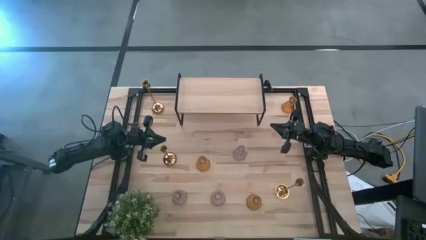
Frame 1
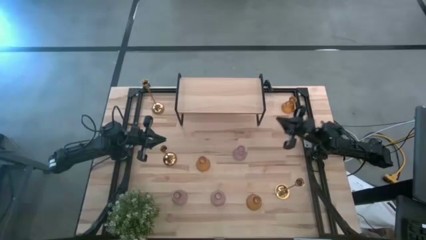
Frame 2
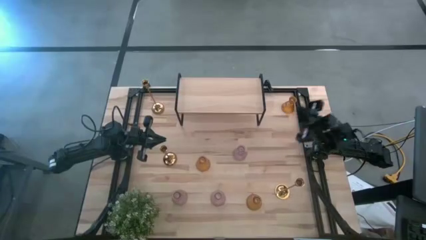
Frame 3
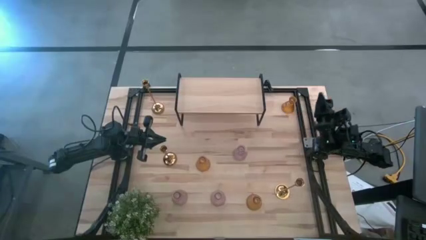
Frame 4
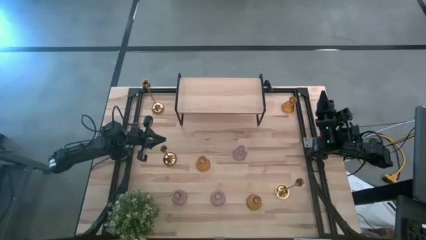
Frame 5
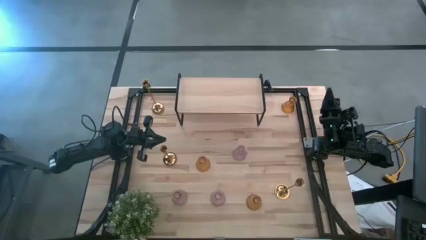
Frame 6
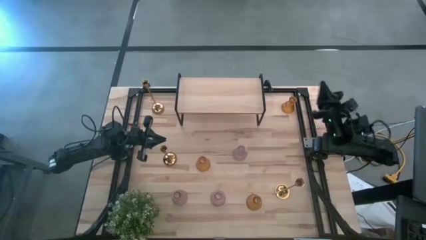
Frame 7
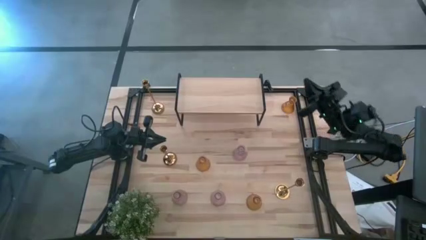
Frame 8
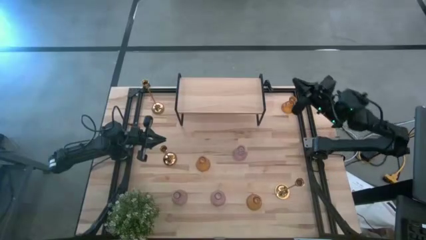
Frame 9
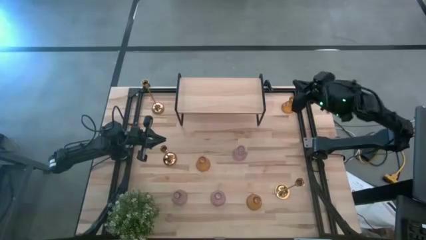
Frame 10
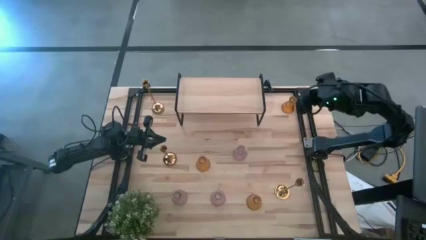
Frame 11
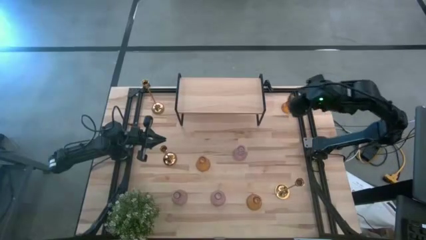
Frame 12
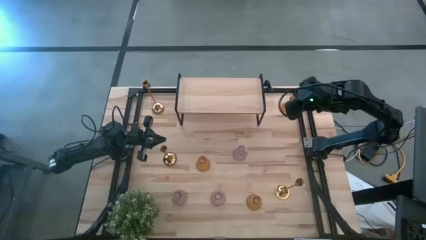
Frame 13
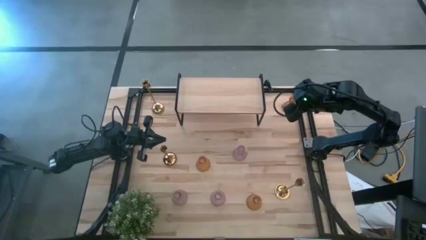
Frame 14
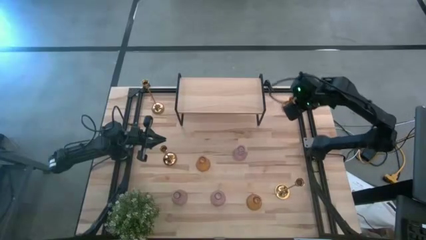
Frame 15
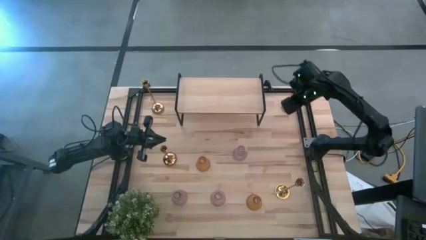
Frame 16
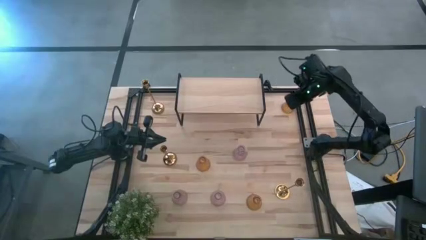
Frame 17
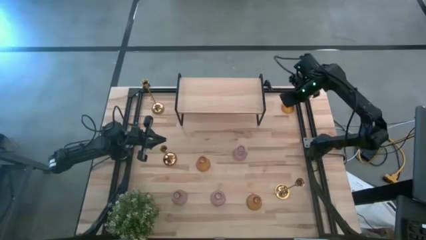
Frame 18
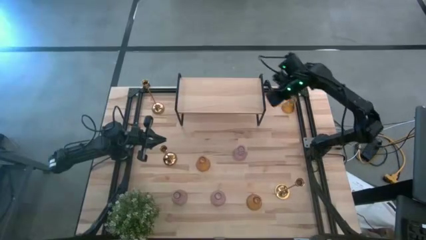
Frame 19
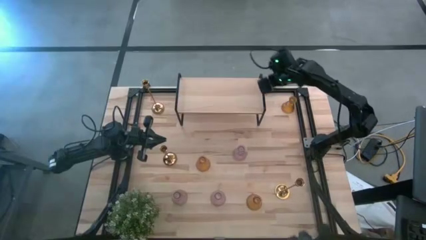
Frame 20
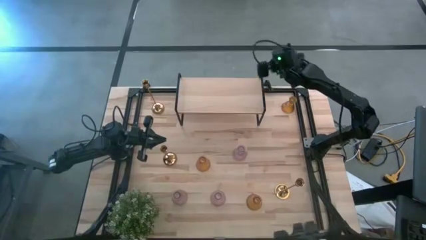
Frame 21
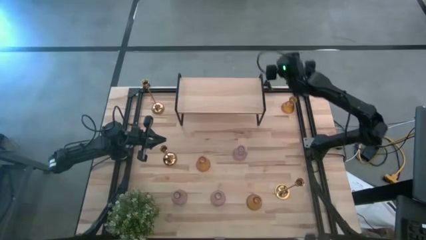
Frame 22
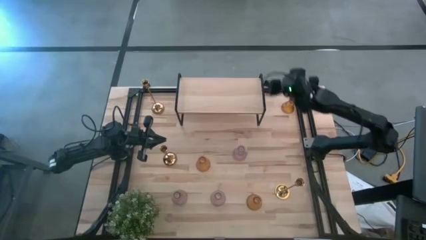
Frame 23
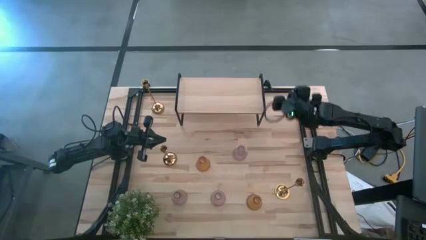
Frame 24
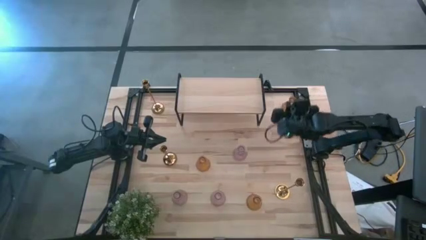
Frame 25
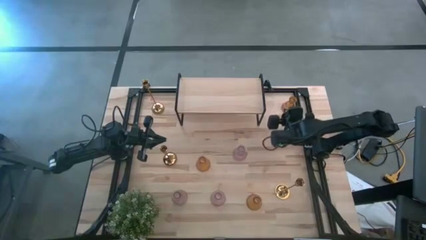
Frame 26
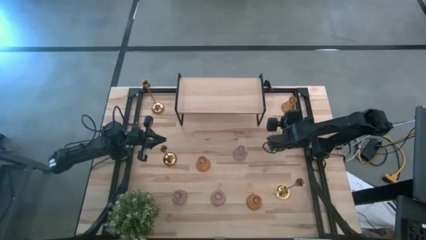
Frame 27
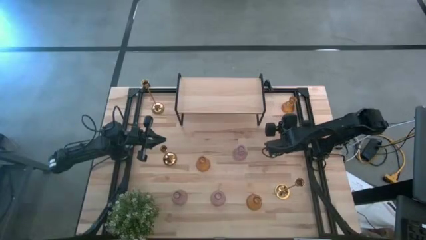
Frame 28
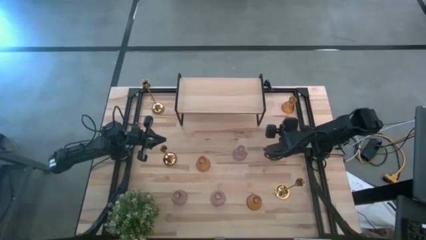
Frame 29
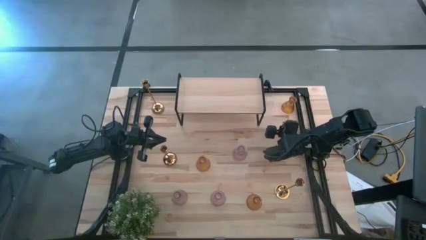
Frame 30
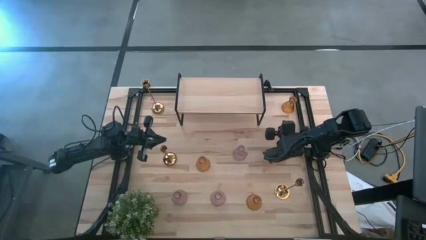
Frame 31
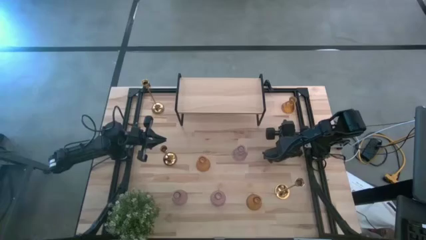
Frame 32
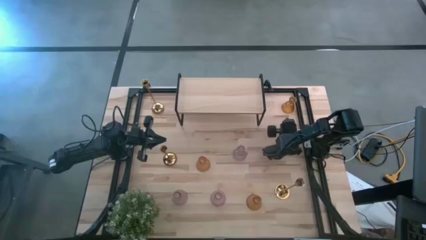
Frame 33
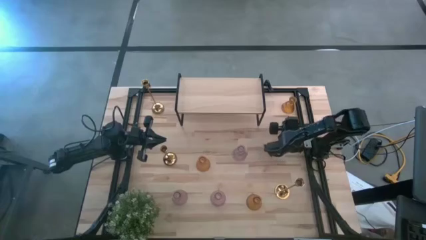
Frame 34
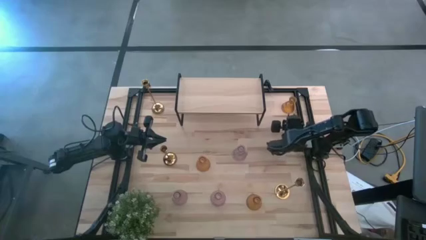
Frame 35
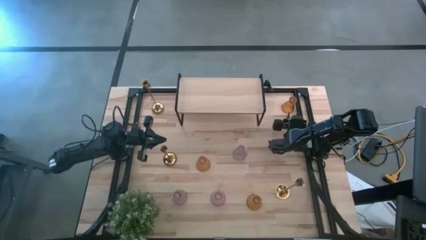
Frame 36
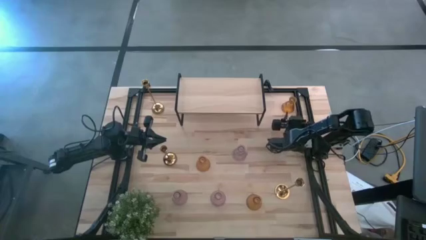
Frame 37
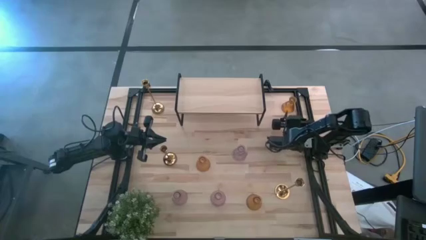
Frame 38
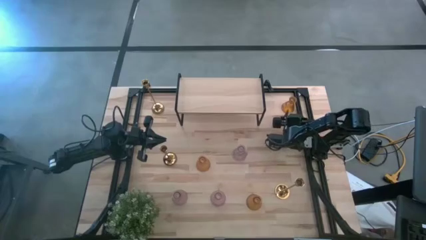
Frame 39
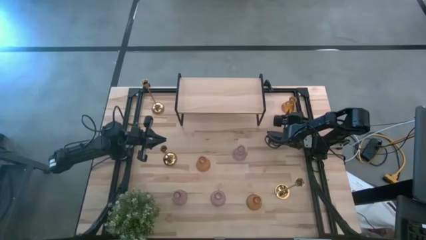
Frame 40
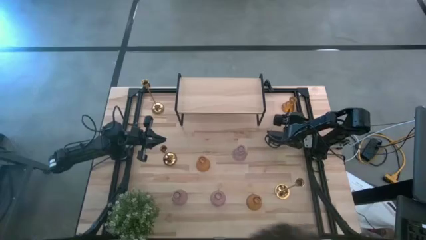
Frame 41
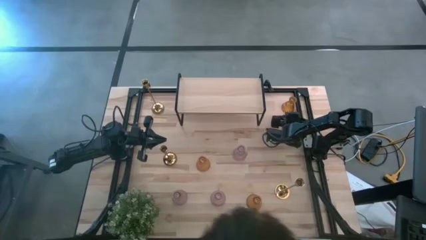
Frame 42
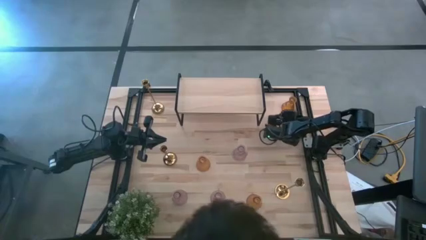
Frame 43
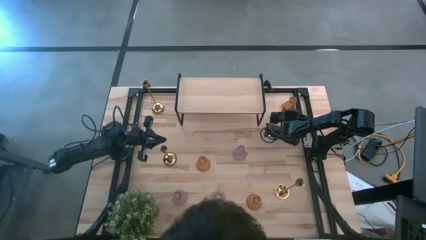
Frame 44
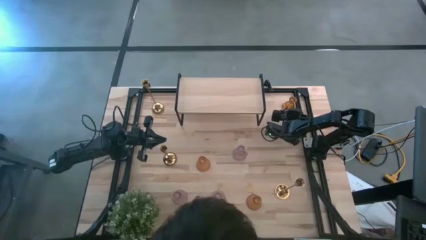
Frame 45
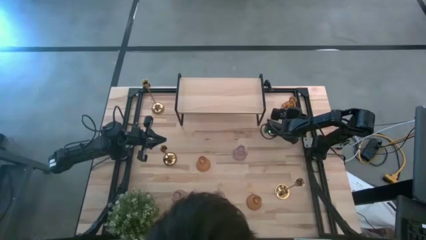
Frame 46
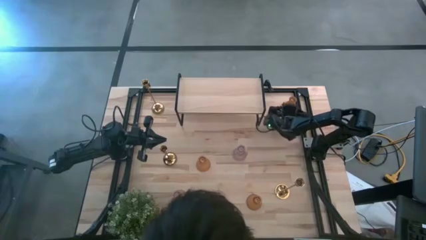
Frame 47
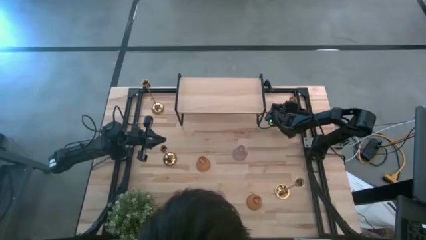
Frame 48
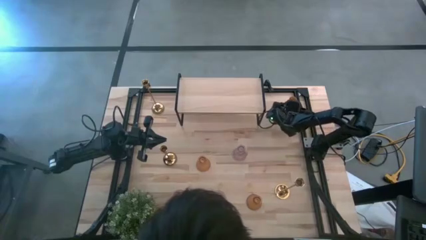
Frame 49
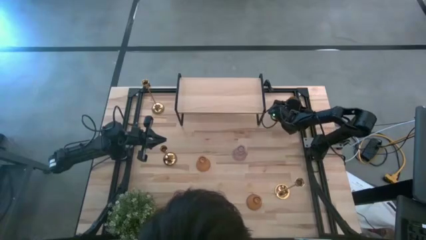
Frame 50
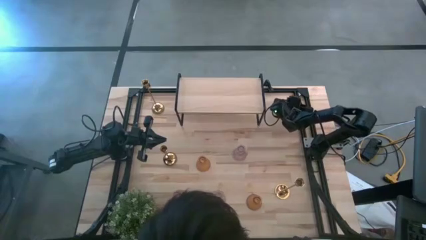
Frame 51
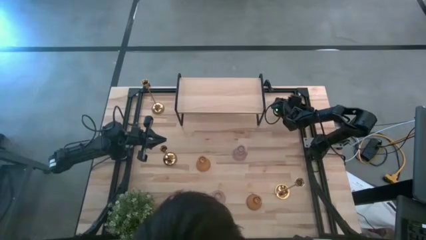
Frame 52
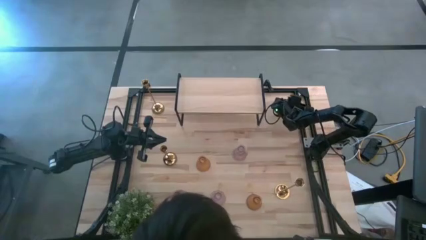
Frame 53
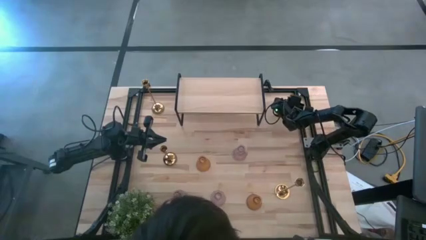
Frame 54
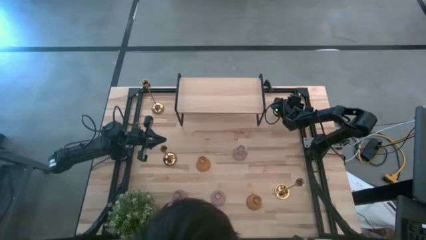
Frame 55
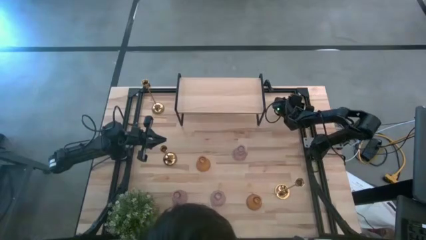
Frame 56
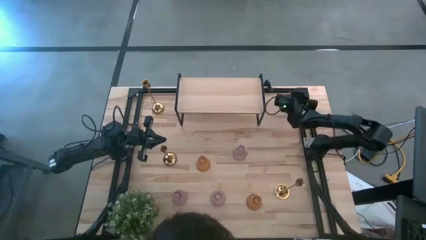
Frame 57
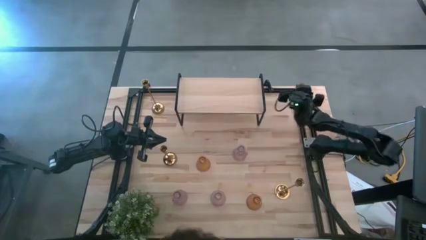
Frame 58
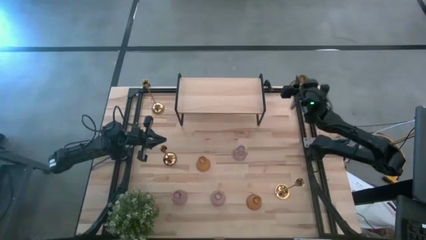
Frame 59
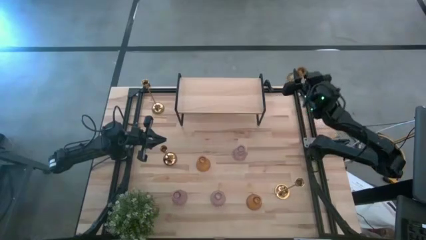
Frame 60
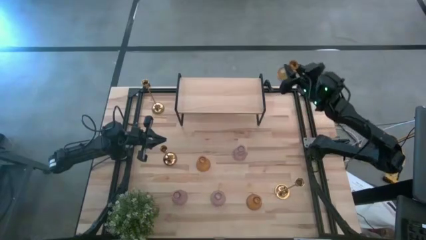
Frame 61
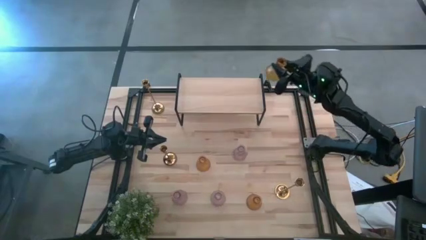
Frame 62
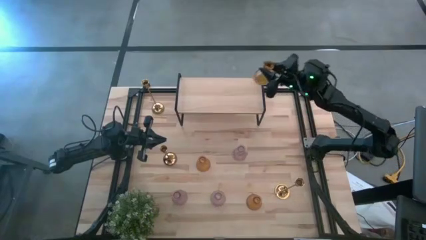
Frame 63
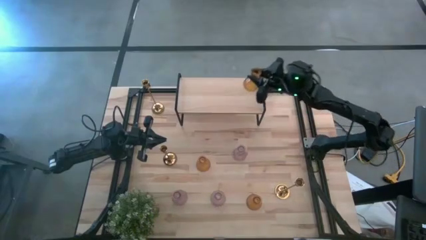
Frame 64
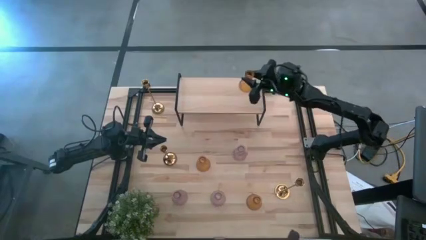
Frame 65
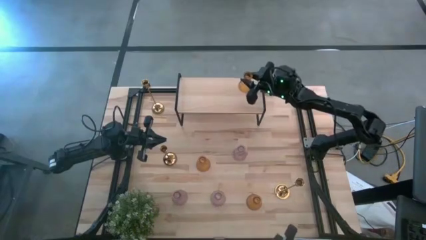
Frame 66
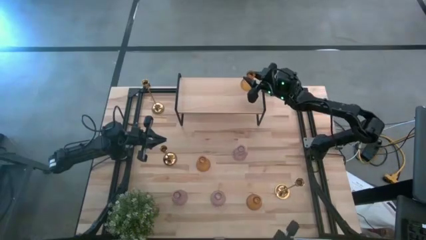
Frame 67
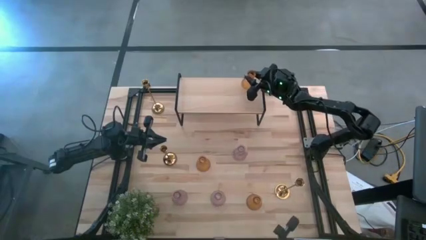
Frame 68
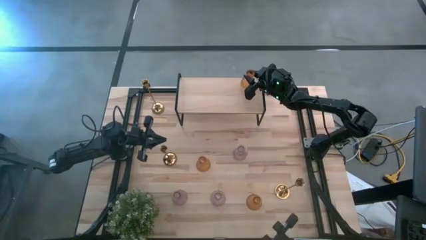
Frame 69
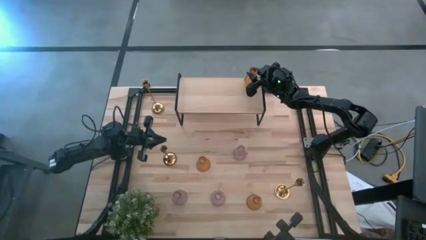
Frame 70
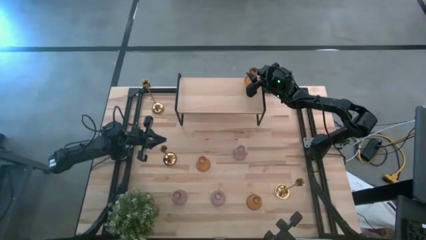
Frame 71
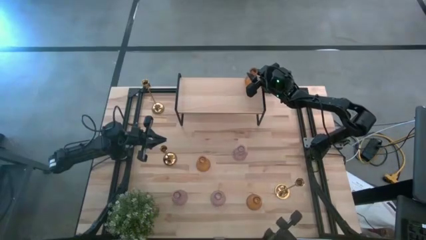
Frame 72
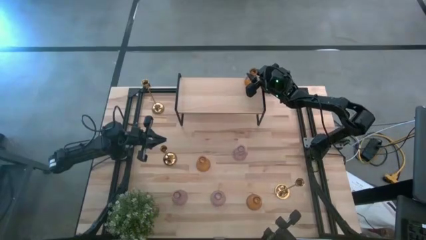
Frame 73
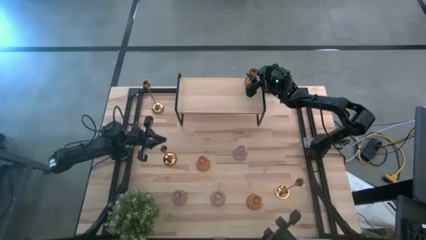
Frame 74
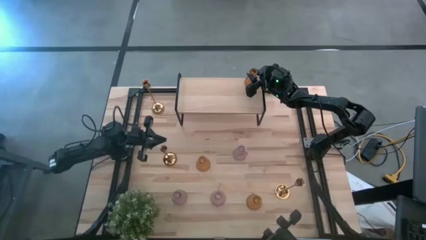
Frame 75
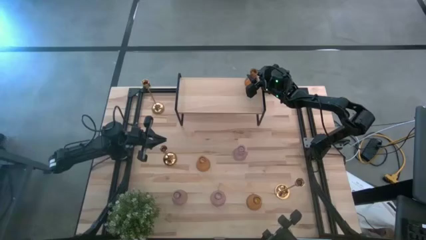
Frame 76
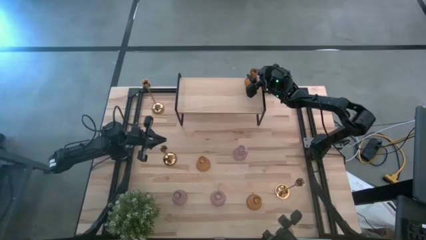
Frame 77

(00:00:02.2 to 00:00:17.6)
Task: Pick & Place candle stick holders
Put the top yellow glass candle holder on the shelf
